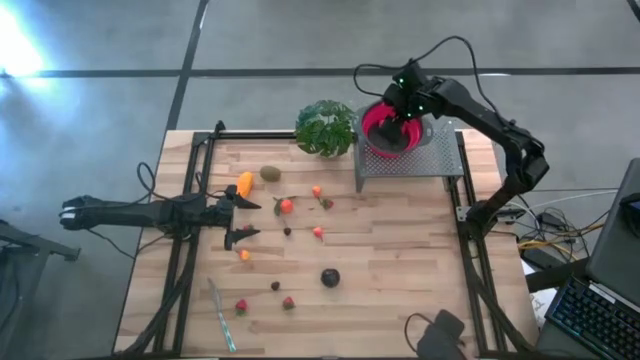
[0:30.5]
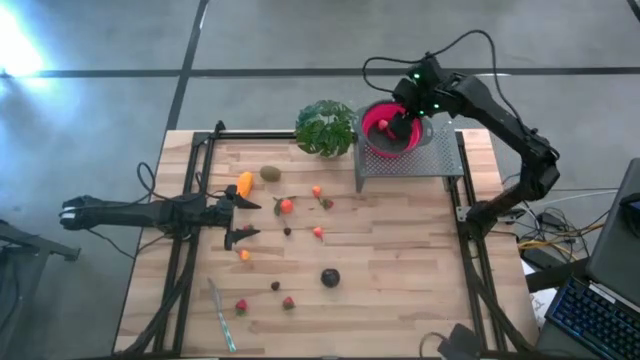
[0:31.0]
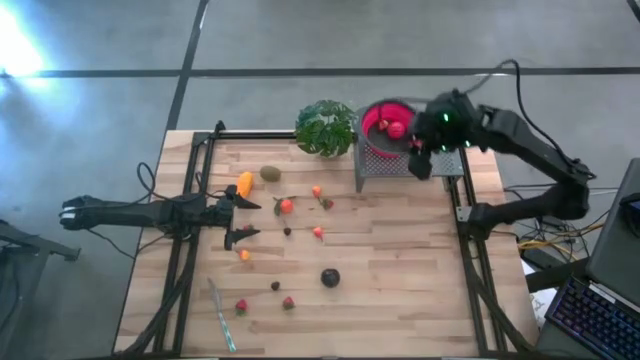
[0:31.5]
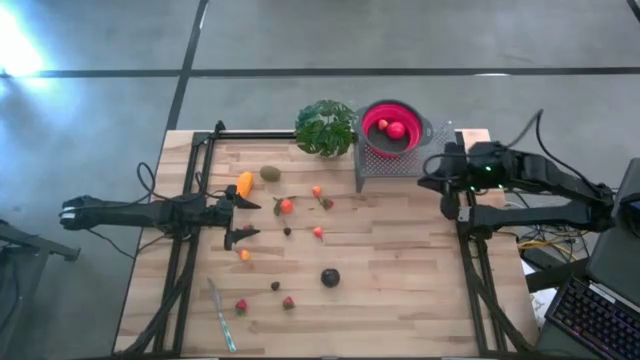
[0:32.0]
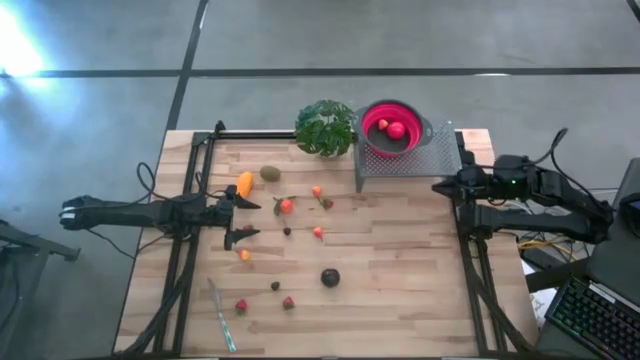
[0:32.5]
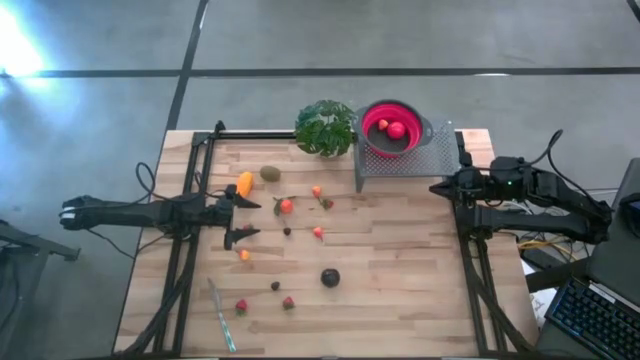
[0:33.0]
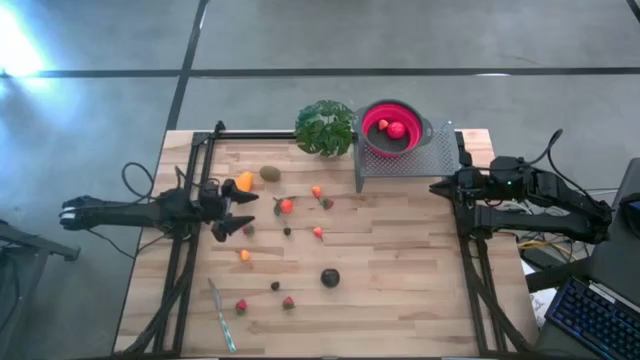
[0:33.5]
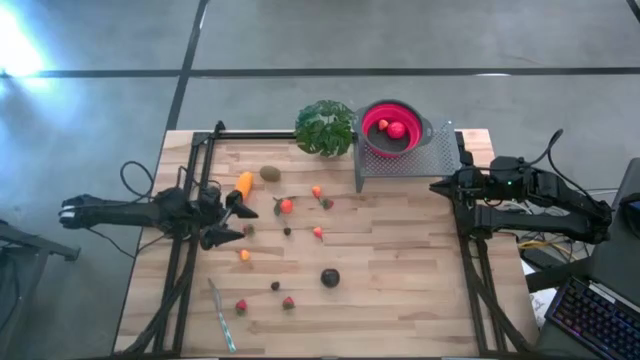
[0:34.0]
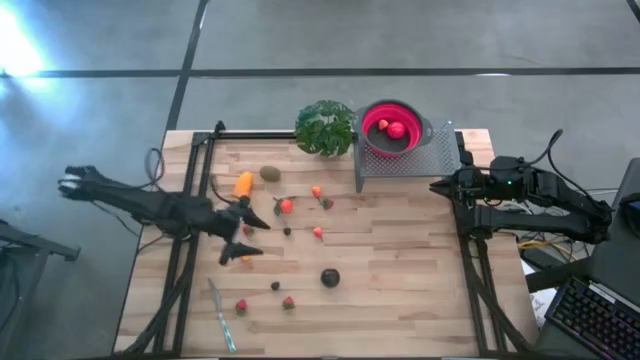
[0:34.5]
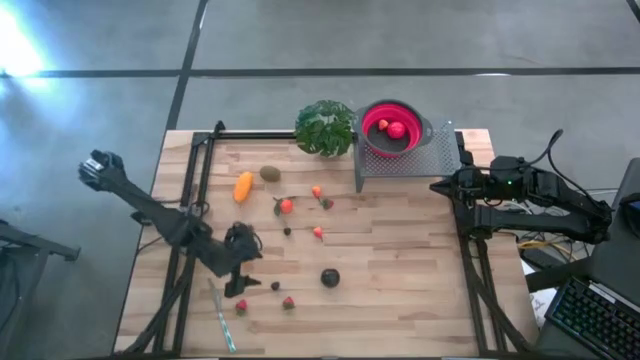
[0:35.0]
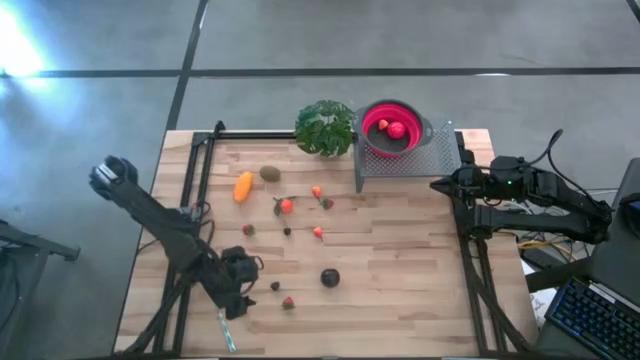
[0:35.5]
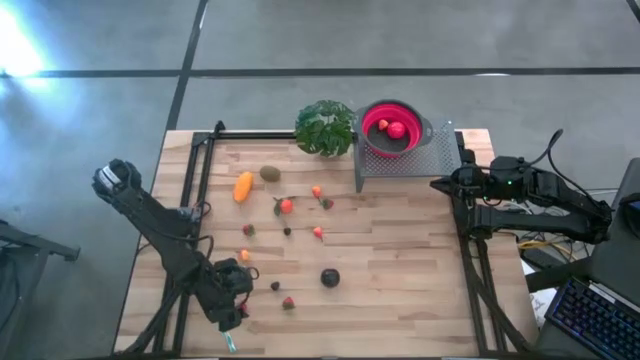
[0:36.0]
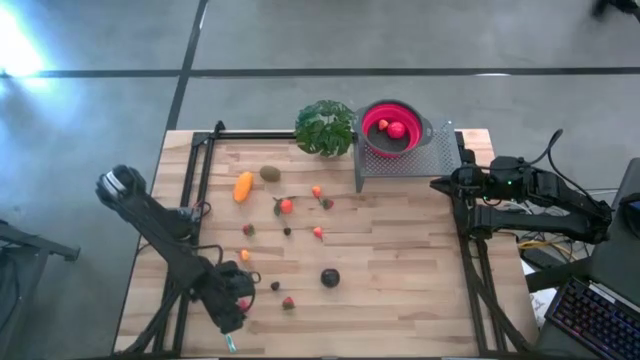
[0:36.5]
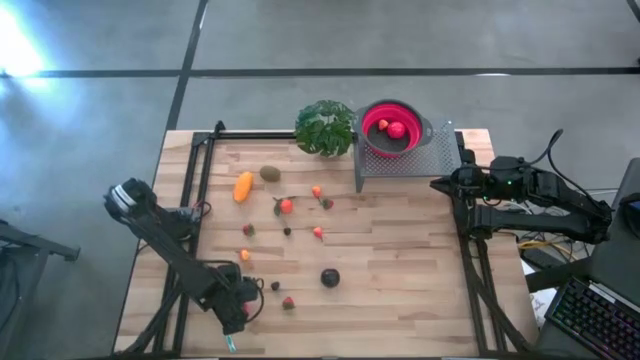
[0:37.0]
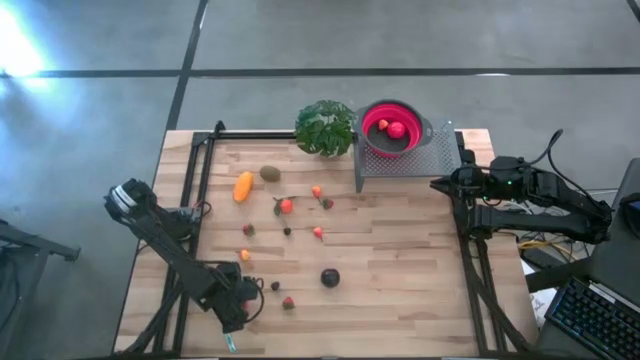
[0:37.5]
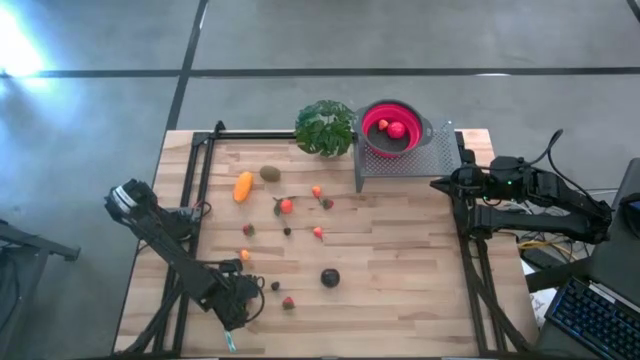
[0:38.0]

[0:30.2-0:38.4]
Task: Pick & Place Fruit
Put the strawberry into the red strainer bowl on the shelf

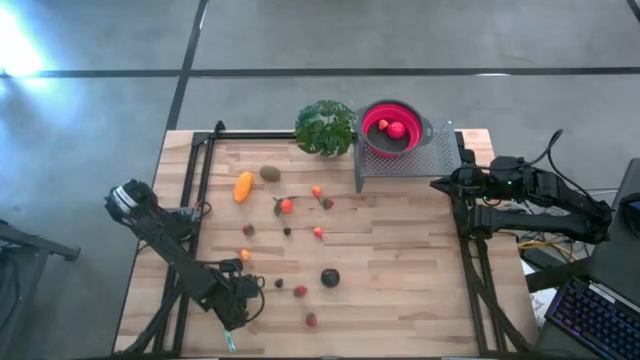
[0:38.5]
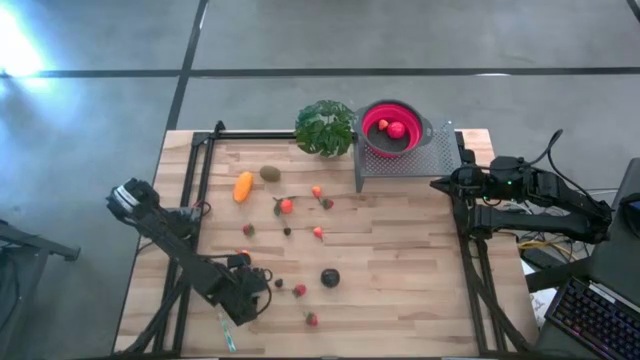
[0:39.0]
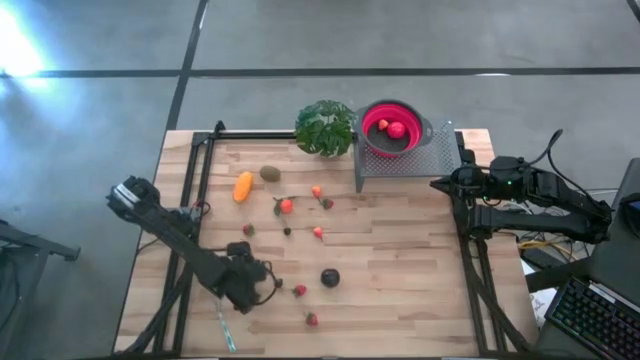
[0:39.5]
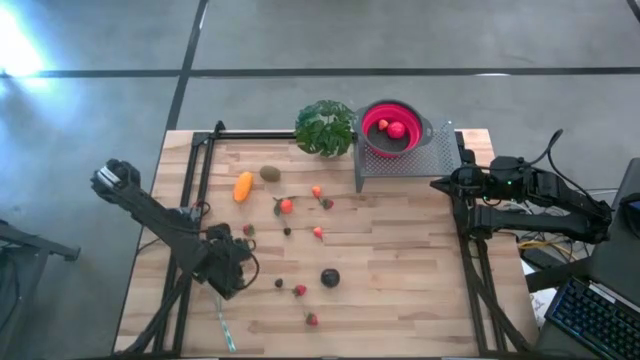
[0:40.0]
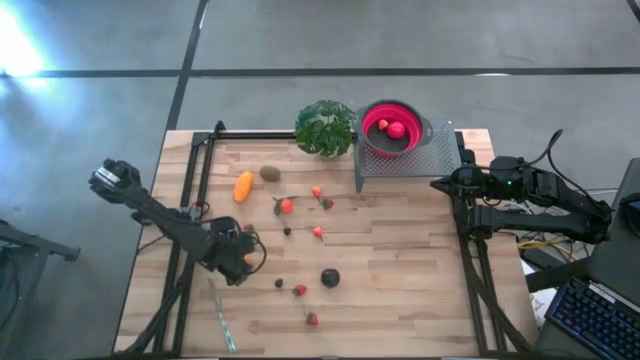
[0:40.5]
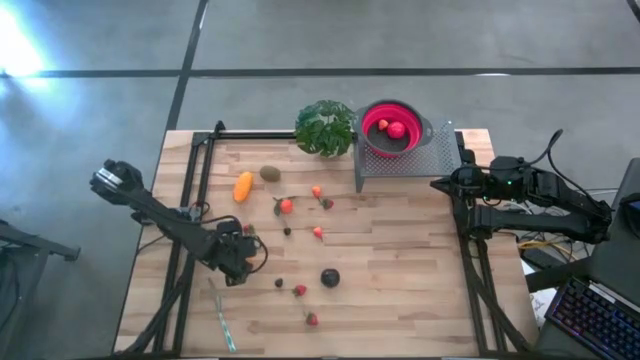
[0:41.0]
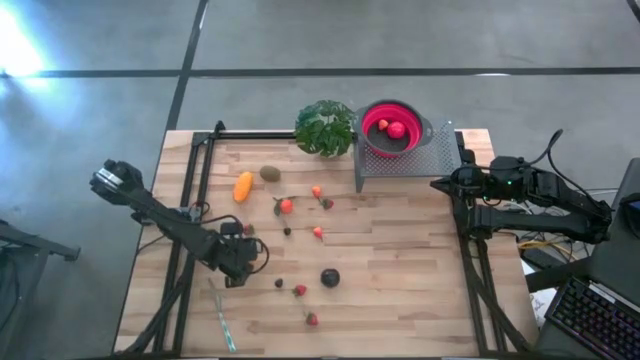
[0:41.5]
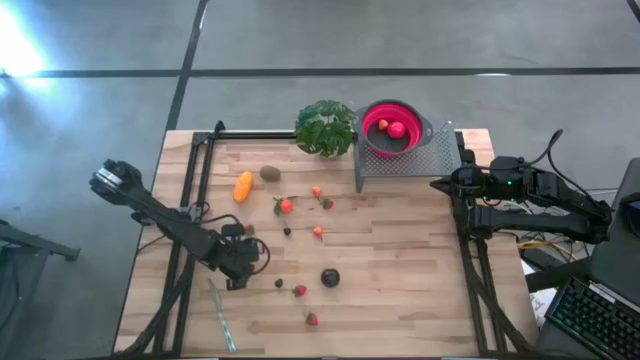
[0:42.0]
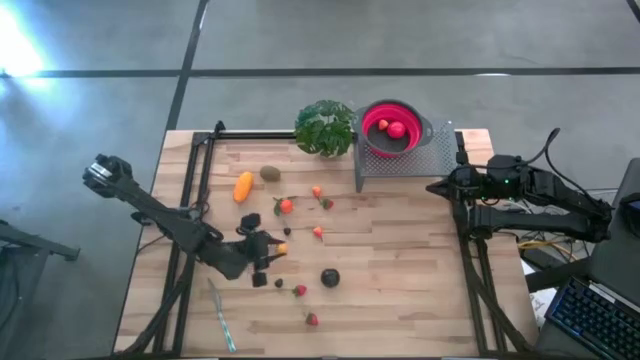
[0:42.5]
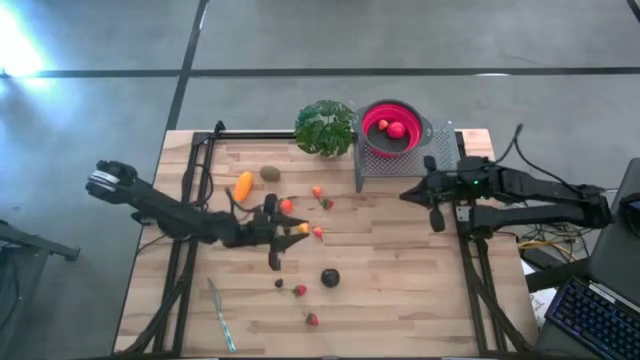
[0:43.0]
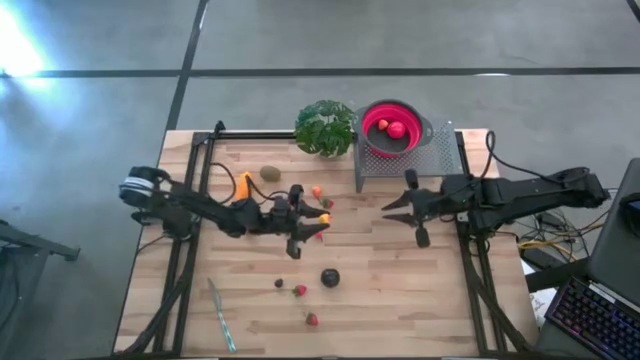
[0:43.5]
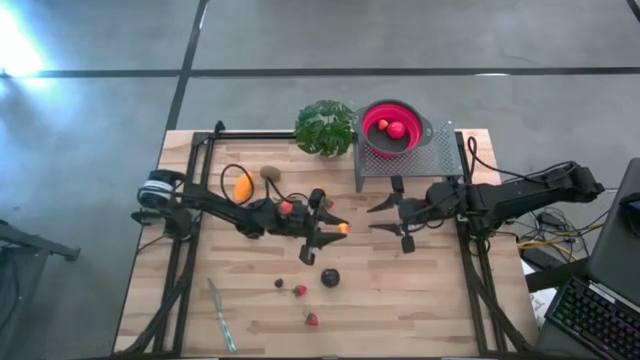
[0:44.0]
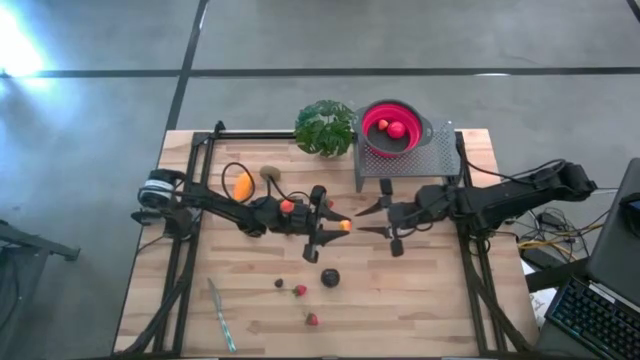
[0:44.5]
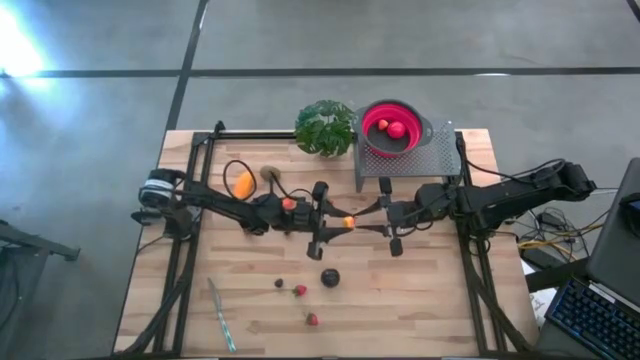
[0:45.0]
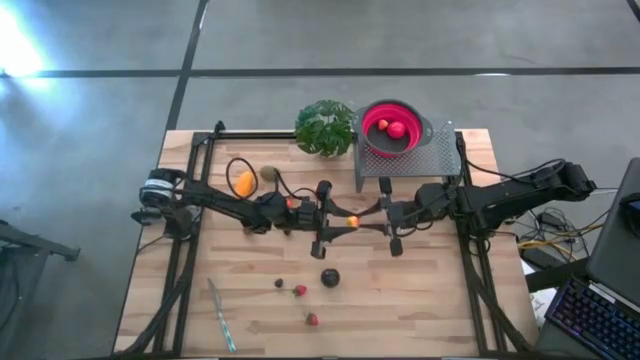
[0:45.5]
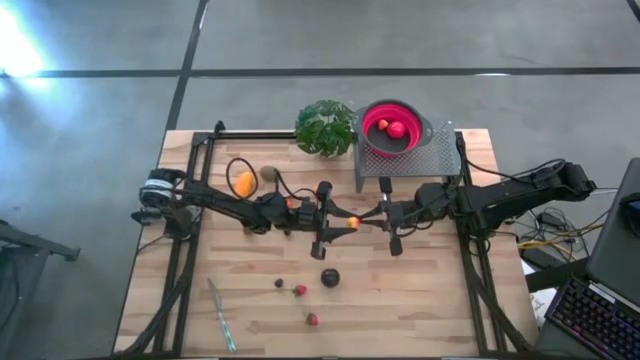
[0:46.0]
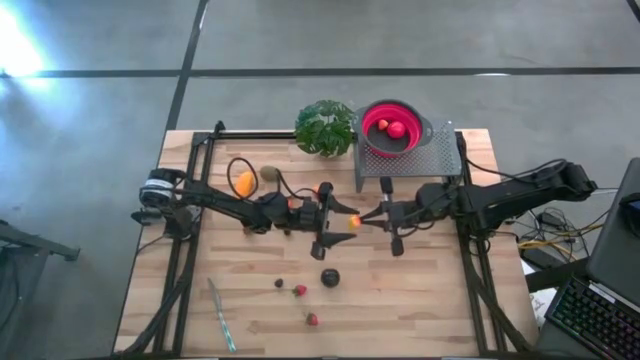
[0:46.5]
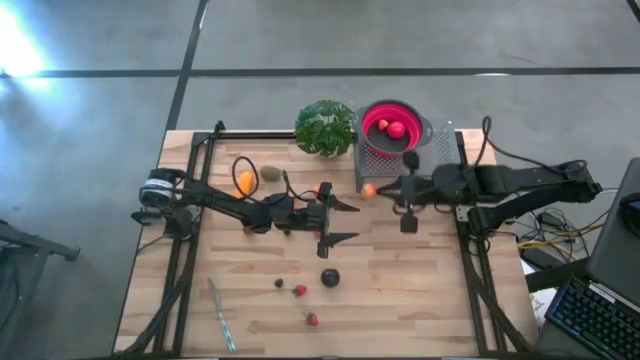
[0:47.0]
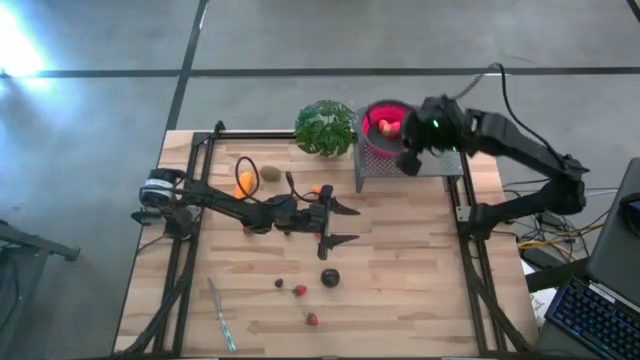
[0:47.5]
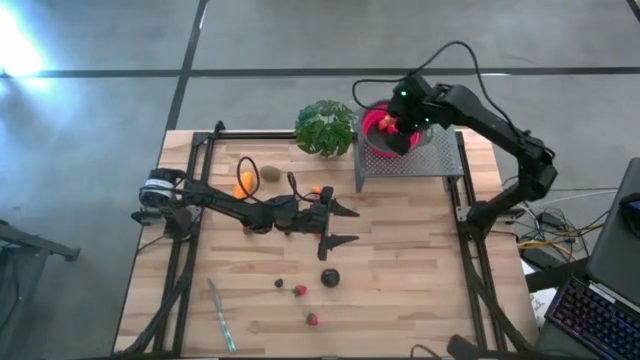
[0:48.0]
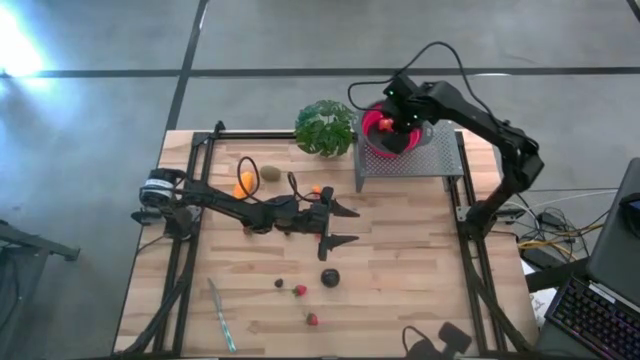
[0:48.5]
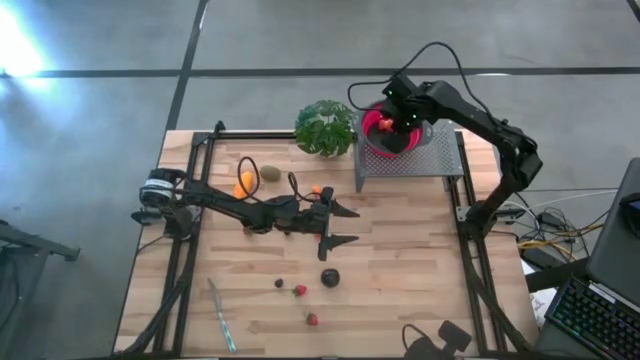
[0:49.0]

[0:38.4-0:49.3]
Put the pear into the red strainer bowl on the shelf

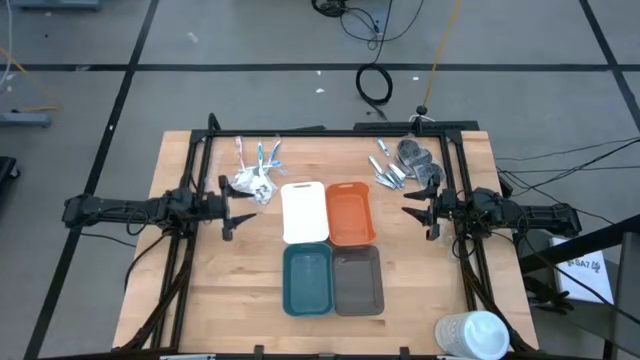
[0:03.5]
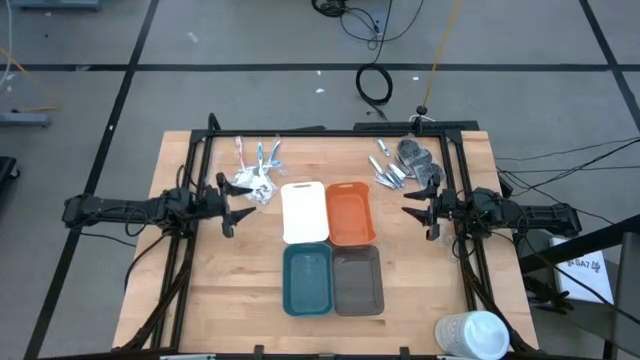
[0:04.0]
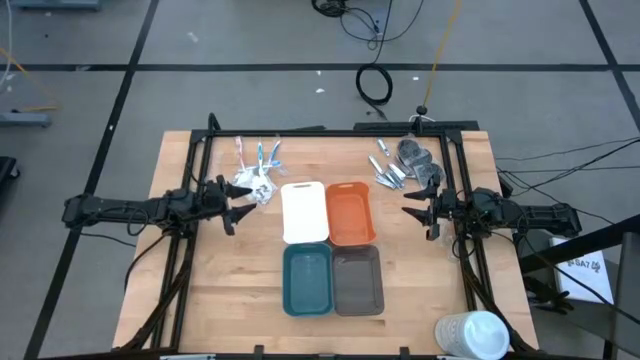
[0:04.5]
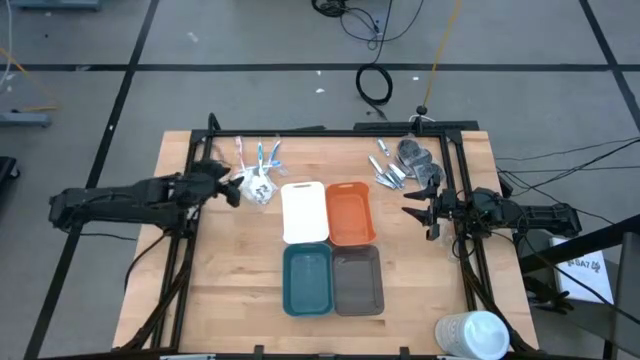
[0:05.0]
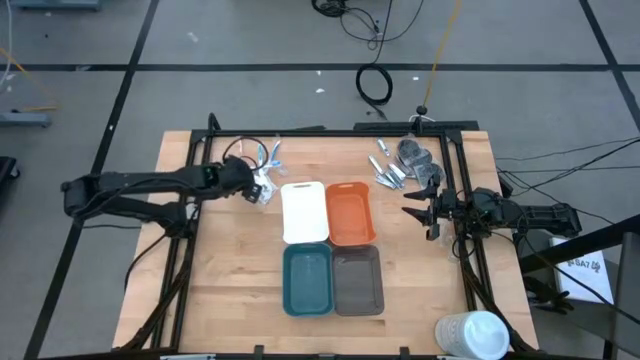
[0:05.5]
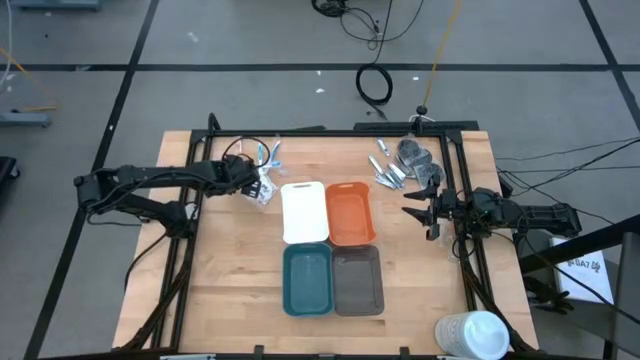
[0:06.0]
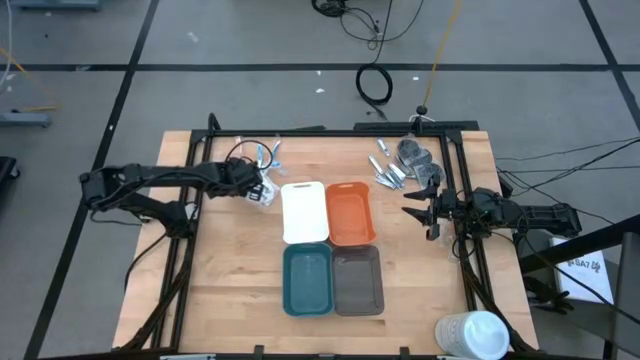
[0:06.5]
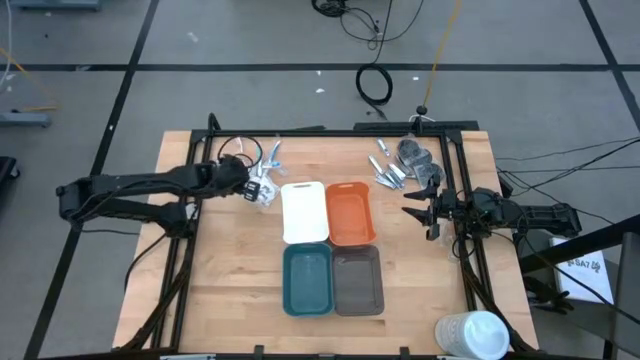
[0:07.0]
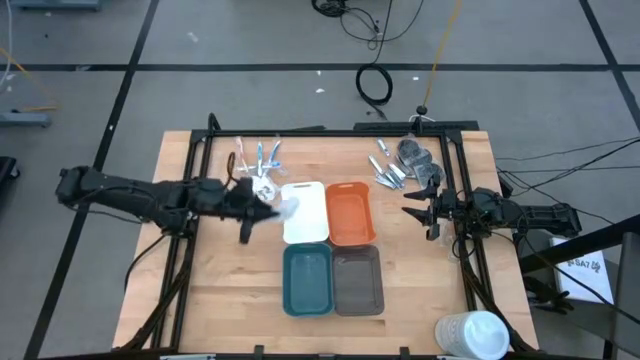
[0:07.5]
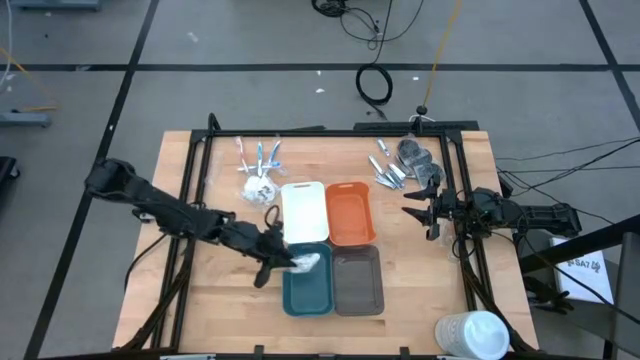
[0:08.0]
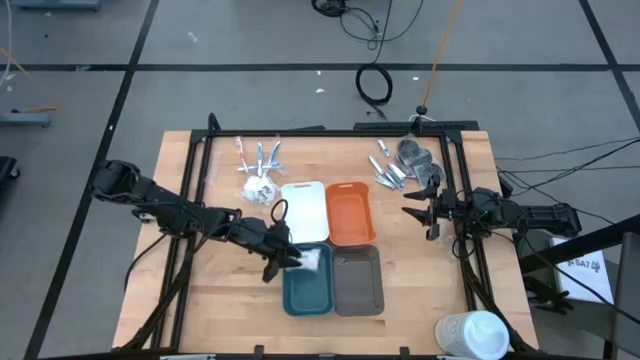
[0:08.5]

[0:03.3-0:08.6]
Task: Pick & Place Travel size toiletries
Put the left vanity pack into the blue bin
